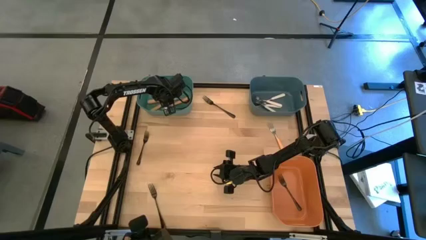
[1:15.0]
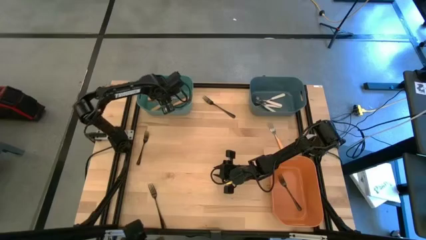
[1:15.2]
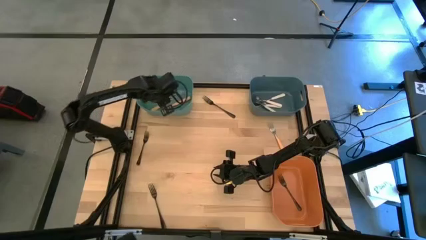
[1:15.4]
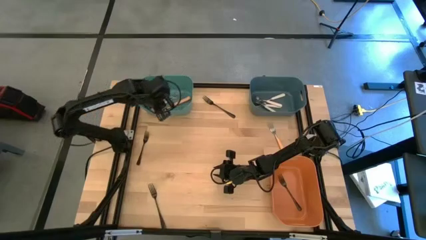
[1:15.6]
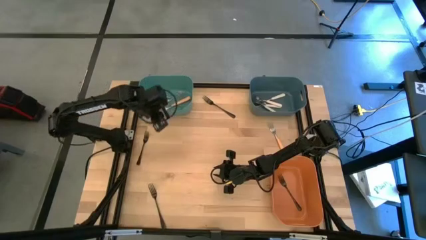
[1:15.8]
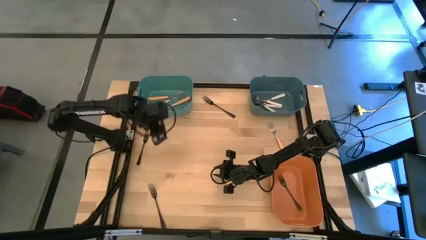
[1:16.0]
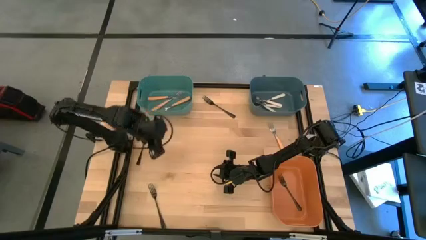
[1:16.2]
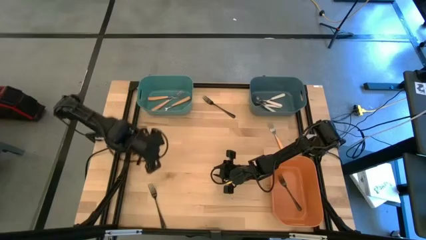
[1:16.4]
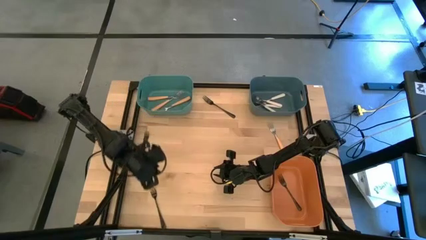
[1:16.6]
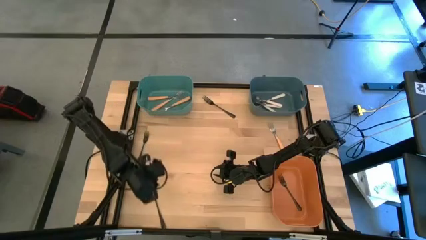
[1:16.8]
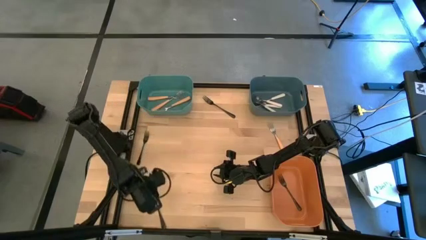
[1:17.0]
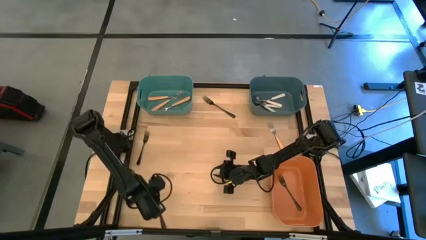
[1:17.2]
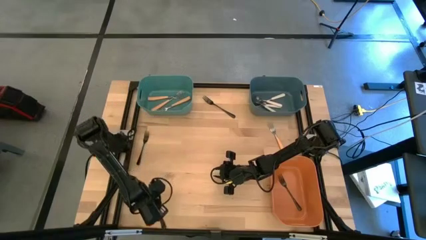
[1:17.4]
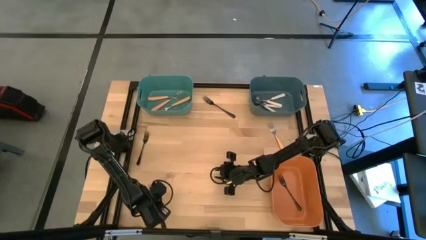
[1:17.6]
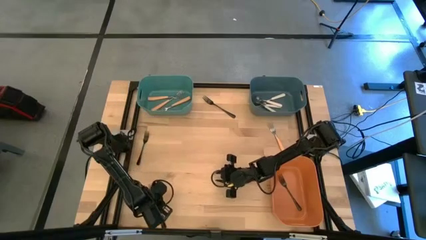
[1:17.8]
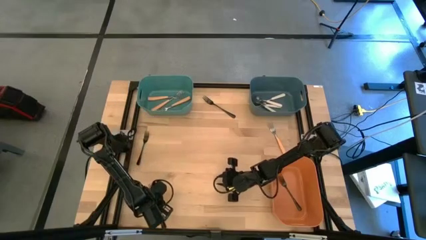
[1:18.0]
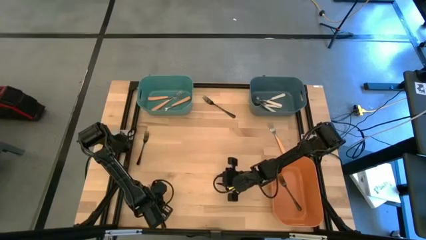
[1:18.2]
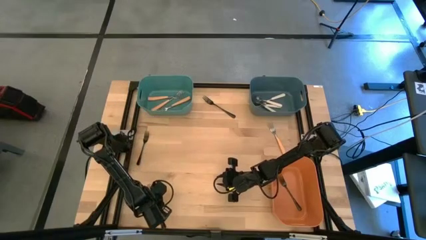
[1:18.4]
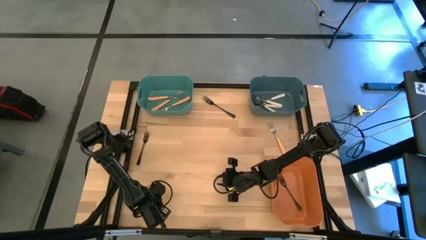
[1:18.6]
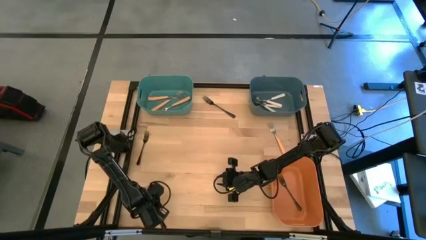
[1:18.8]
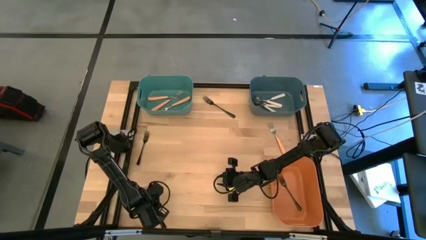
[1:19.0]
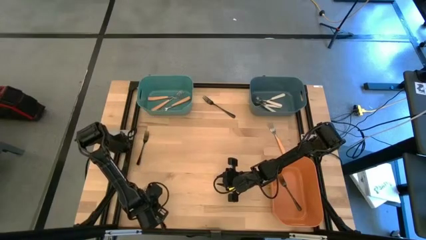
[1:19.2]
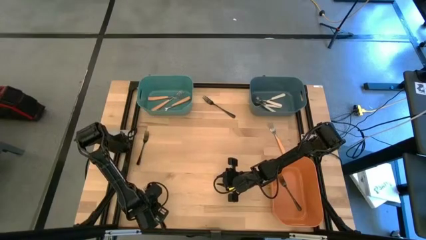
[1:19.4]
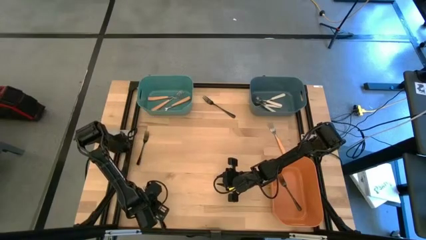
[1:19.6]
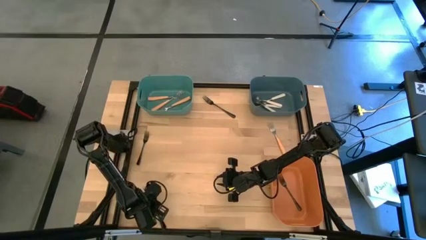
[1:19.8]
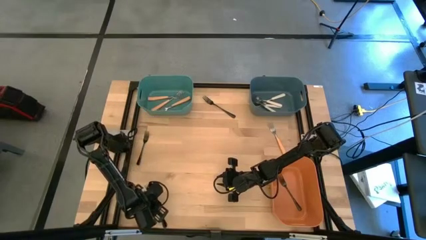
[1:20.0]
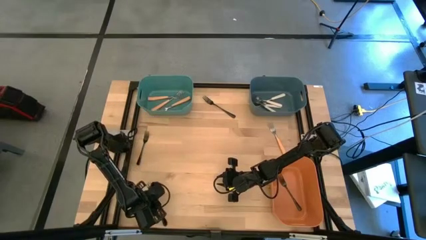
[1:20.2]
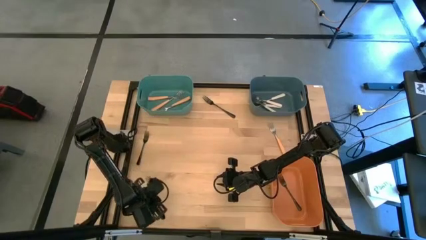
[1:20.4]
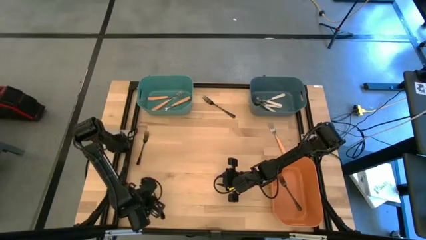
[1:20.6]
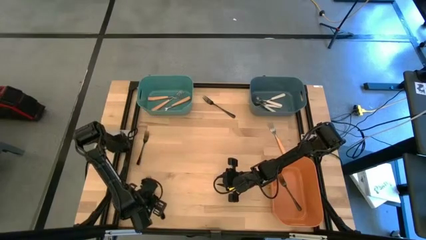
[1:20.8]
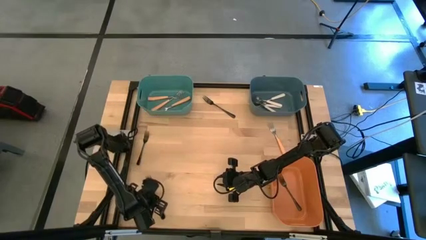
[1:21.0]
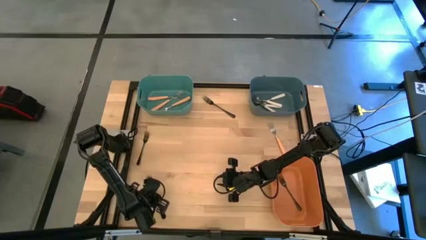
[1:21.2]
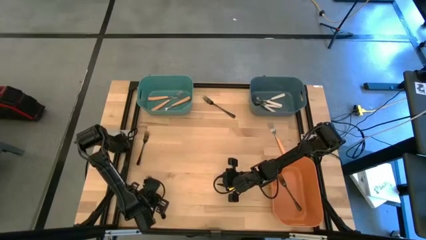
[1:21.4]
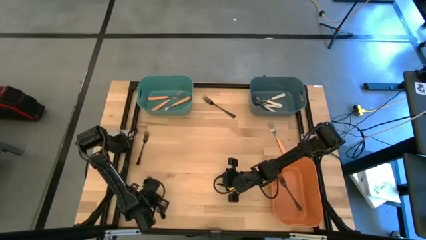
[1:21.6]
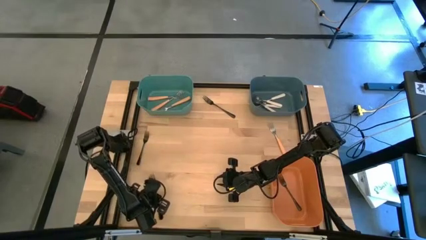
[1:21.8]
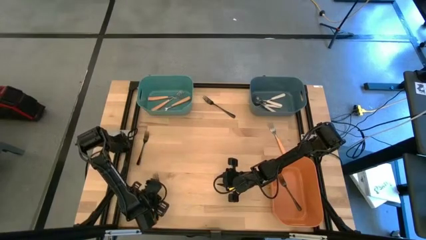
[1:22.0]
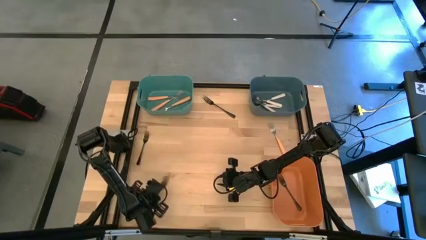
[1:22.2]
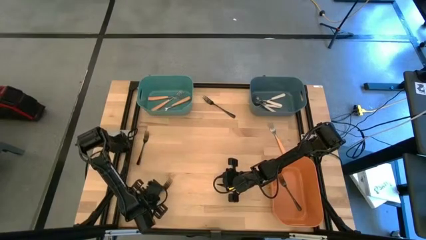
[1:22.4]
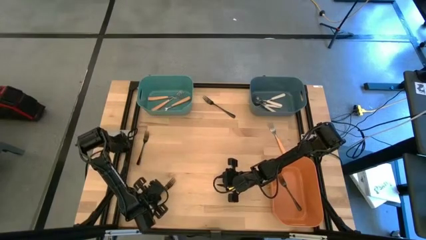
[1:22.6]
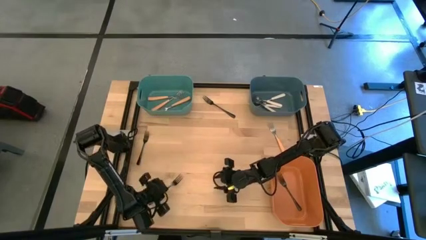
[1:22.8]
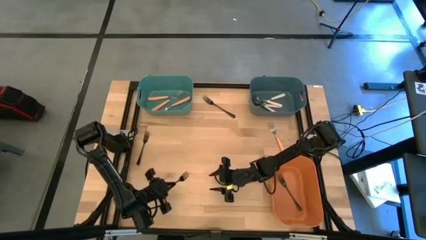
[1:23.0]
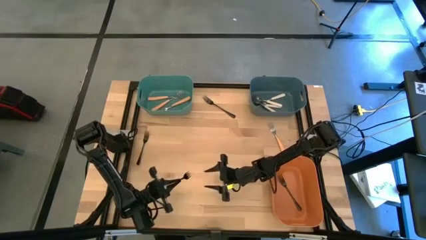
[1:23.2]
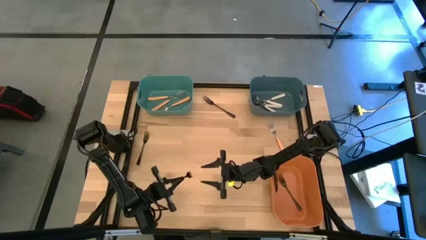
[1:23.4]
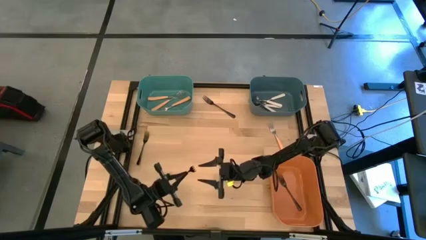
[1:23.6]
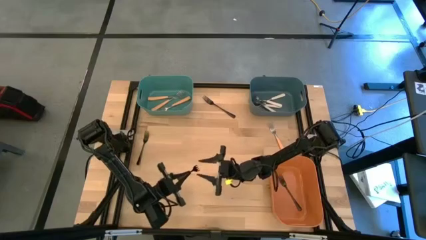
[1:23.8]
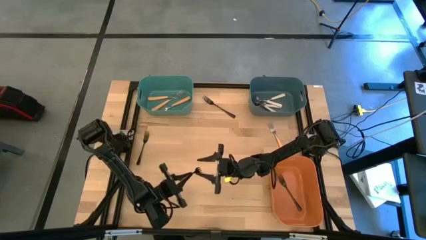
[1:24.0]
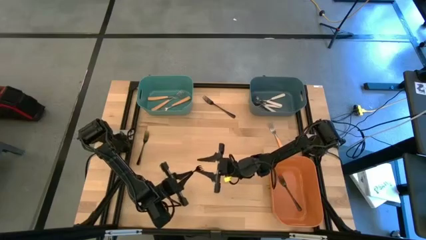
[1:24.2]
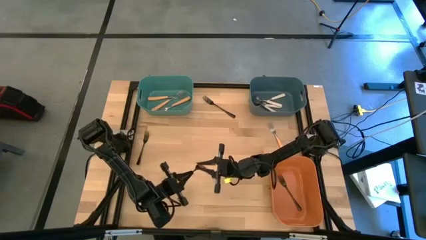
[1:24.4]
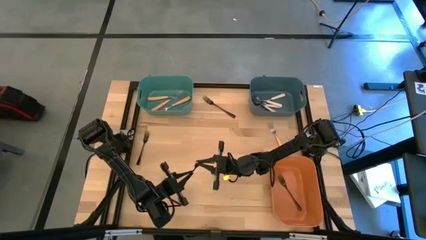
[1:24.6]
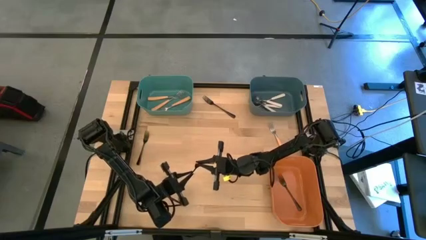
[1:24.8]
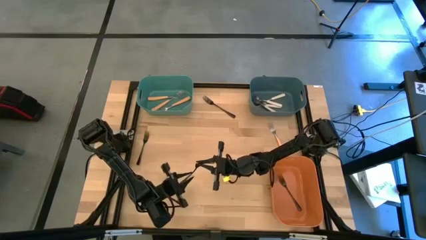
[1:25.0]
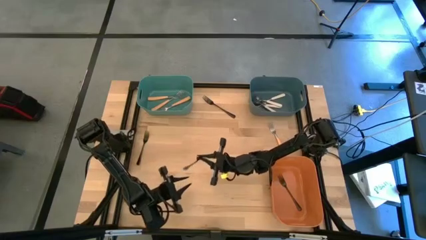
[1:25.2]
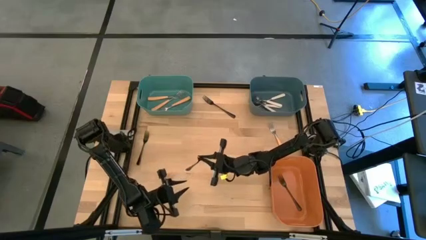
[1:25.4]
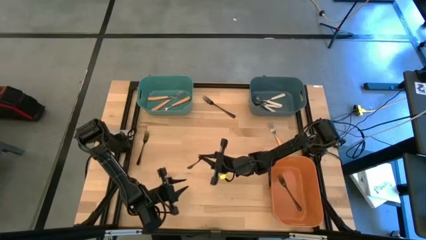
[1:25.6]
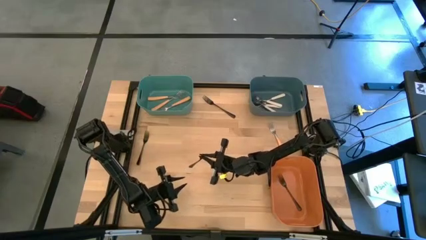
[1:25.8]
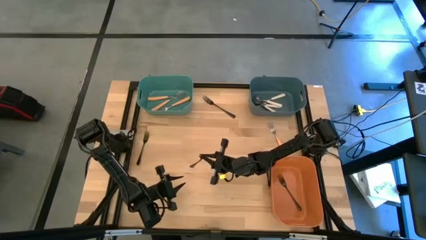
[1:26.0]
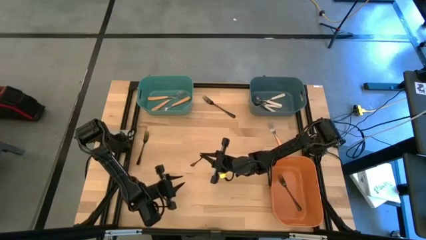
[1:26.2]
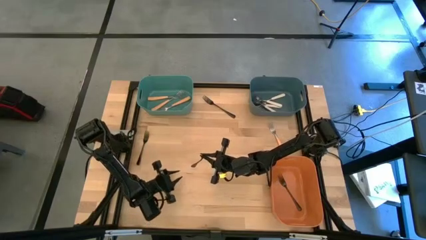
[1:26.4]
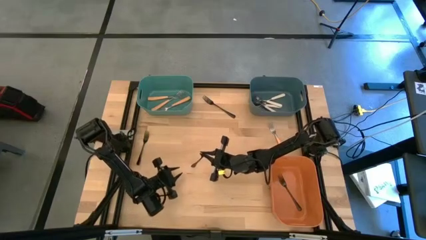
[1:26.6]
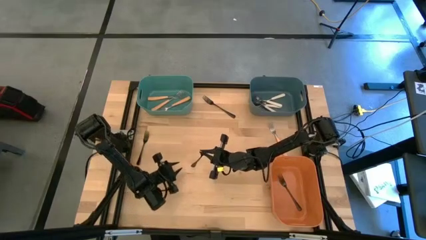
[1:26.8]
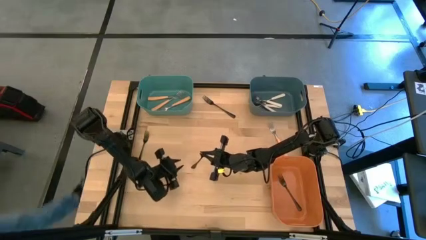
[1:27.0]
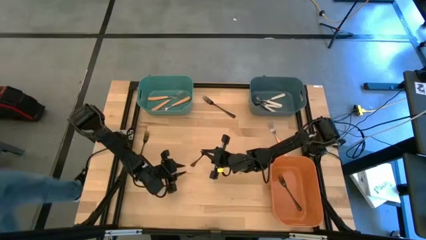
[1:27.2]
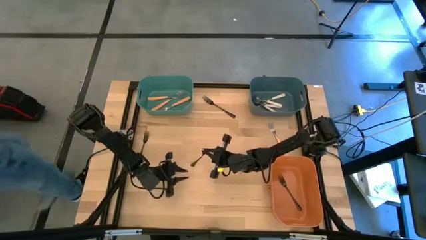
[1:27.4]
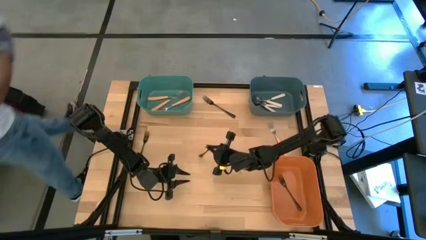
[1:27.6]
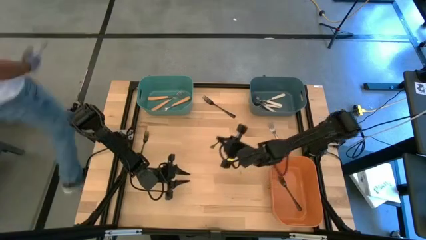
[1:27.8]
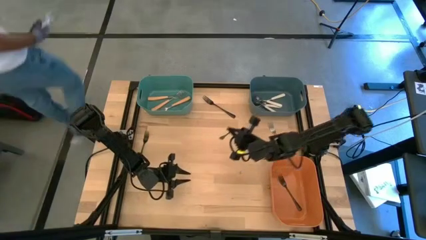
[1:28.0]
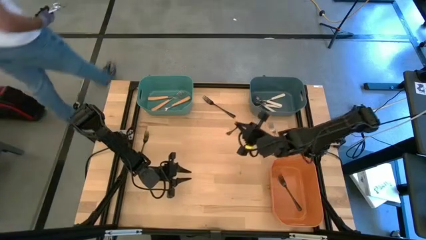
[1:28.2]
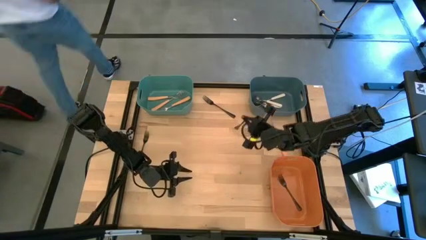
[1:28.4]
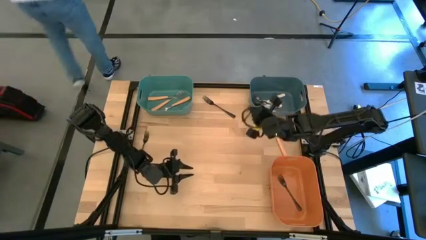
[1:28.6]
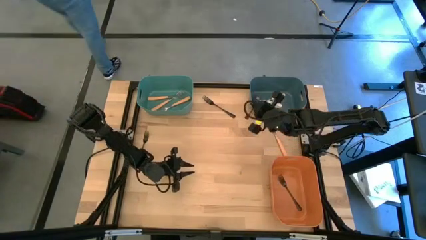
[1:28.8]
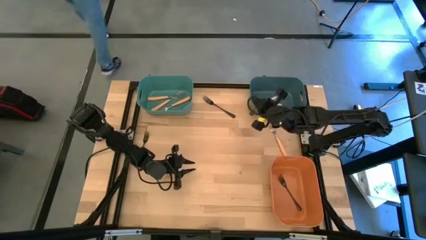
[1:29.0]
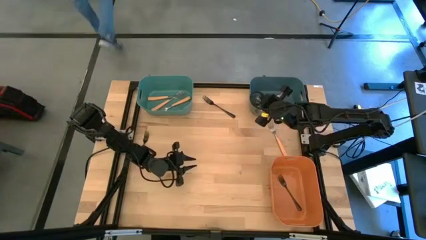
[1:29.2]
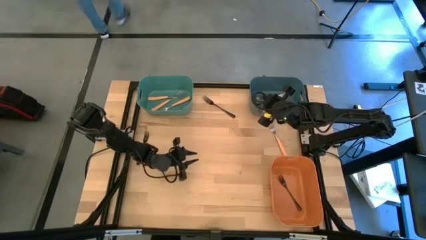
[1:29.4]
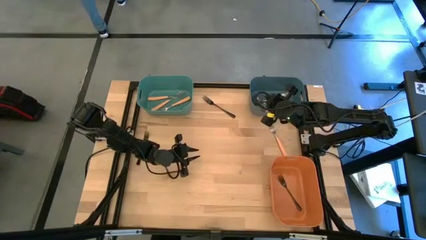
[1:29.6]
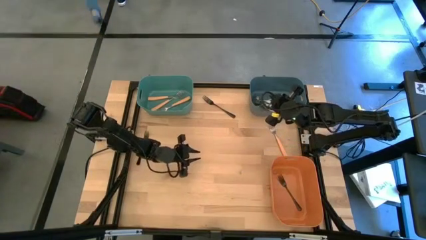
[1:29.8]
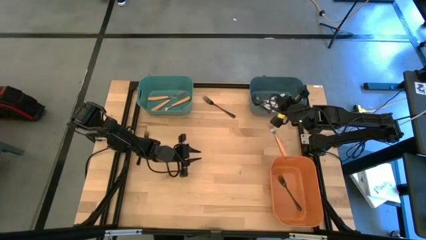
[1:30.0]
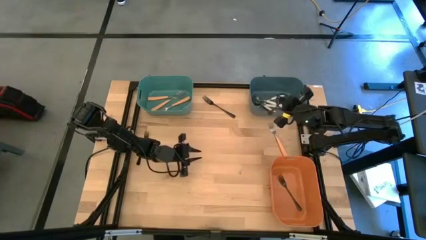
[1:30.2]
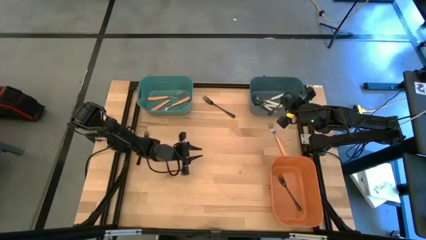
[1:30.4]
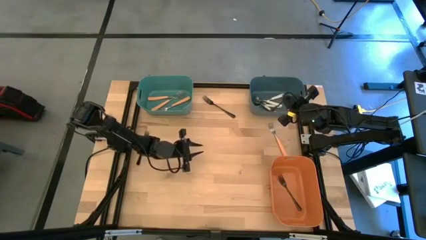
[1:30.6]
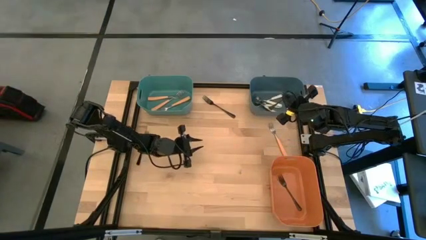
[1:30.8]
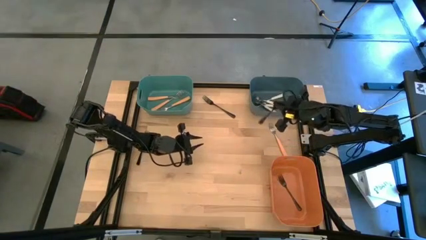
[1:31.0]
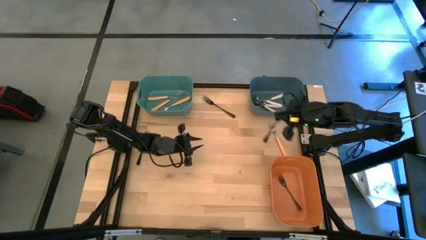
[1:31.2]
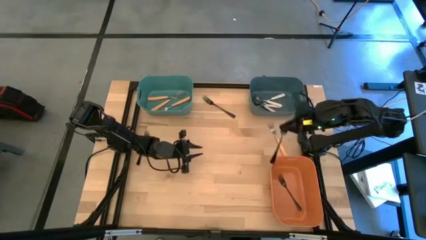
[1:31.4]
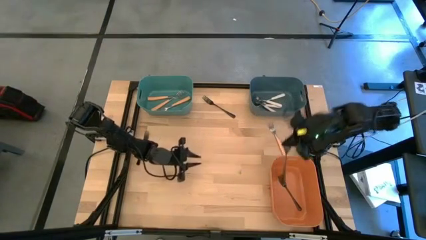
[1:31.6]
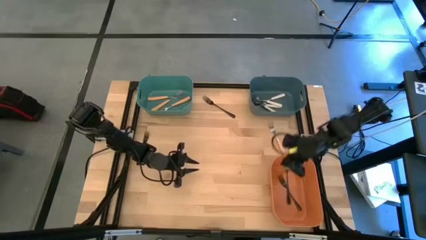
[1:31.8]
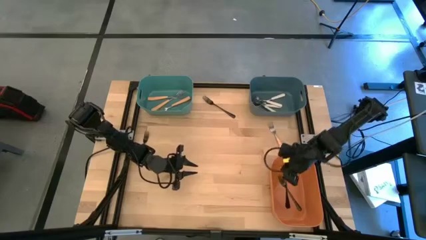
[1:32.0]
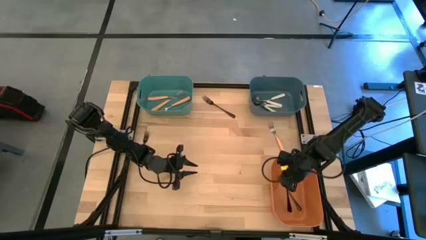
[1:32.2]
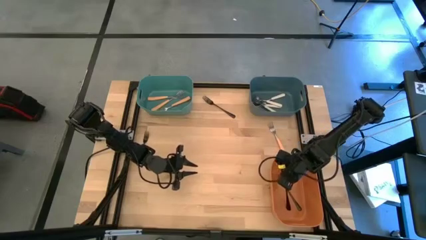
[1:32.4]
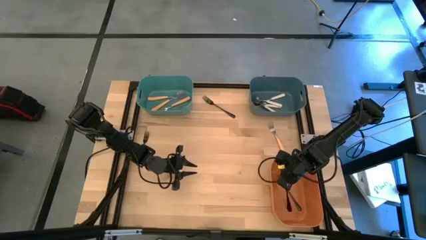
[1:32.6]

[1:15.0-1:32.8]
Task: Sort silverware by color (type)
Put the black fork into the orange bin
